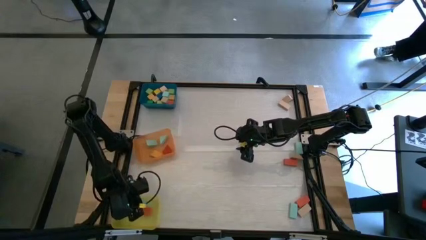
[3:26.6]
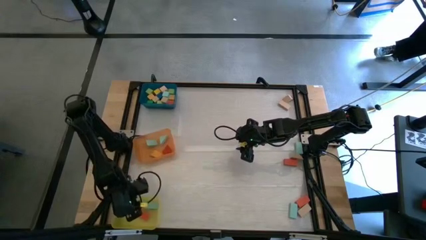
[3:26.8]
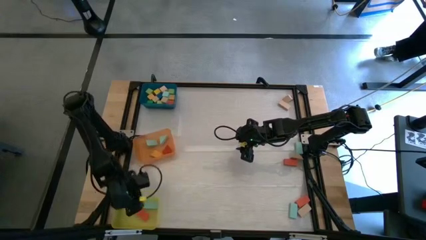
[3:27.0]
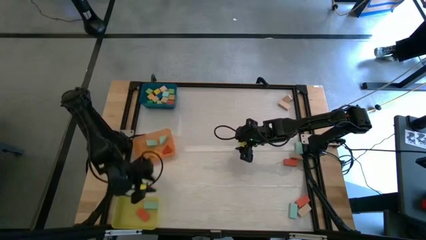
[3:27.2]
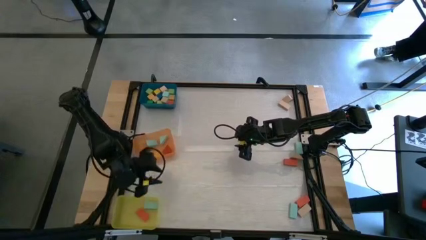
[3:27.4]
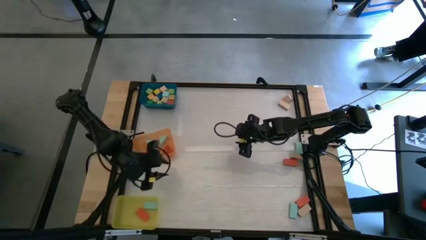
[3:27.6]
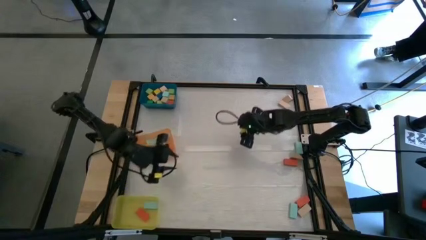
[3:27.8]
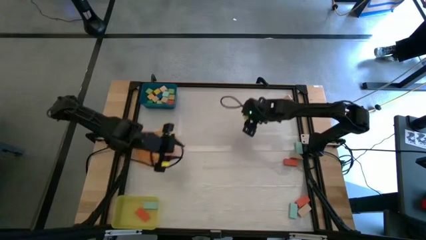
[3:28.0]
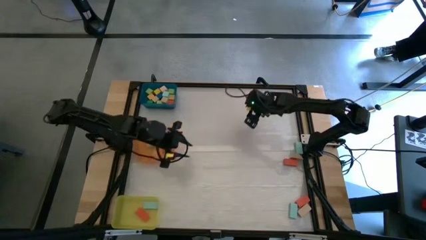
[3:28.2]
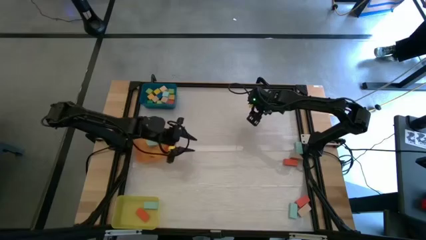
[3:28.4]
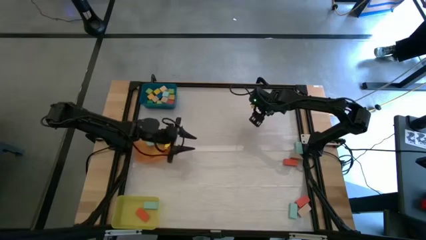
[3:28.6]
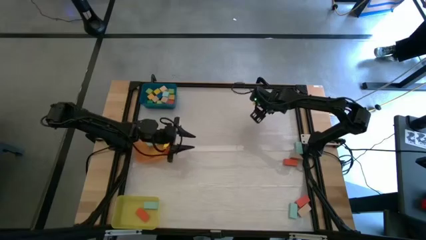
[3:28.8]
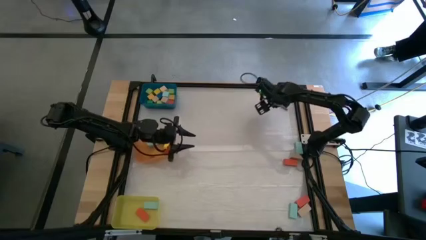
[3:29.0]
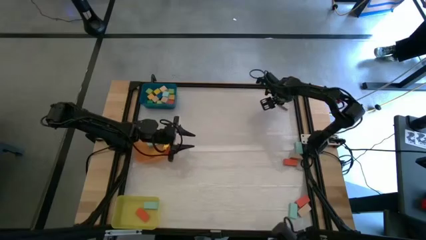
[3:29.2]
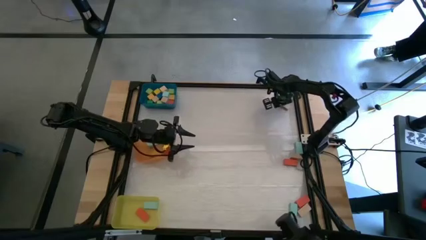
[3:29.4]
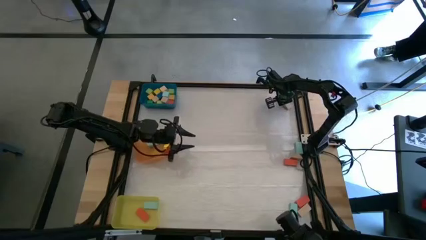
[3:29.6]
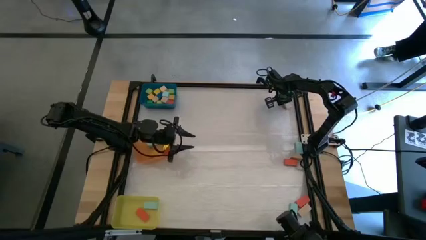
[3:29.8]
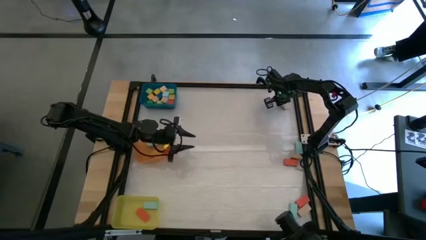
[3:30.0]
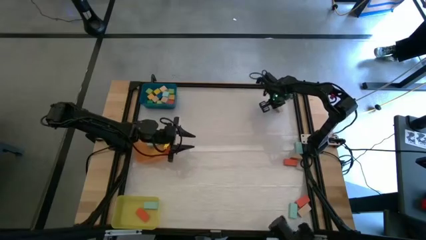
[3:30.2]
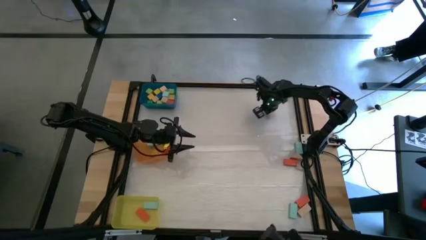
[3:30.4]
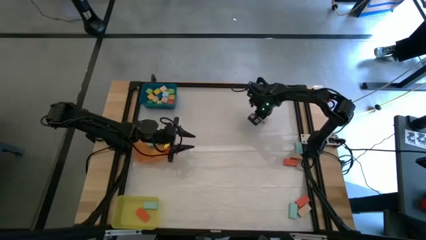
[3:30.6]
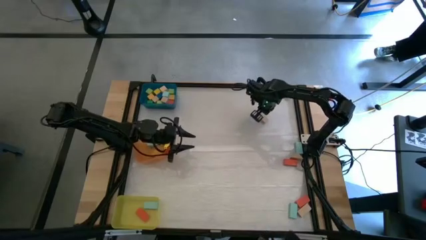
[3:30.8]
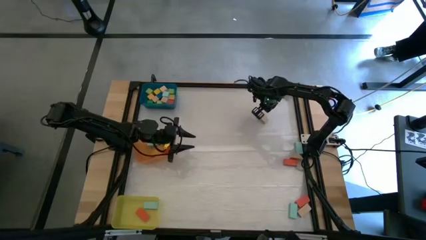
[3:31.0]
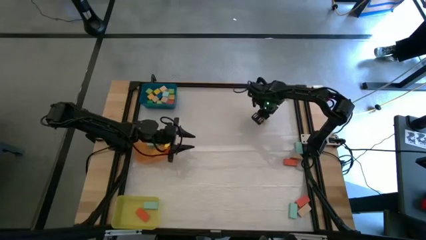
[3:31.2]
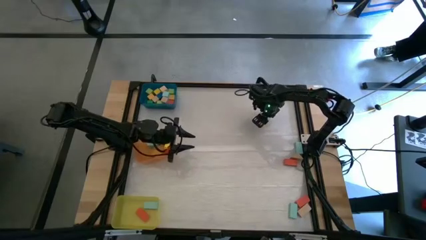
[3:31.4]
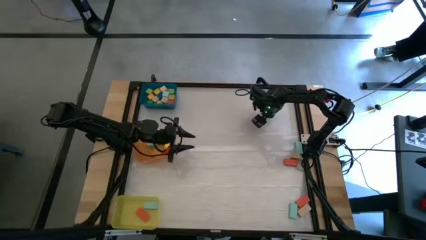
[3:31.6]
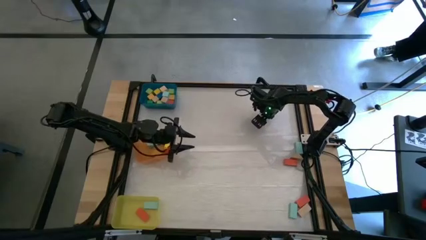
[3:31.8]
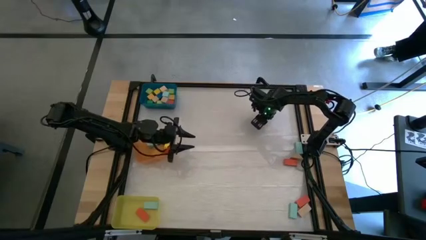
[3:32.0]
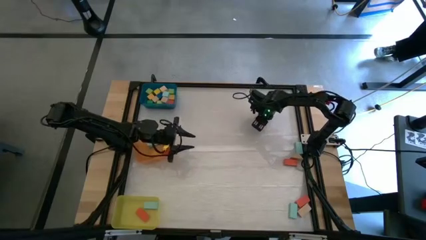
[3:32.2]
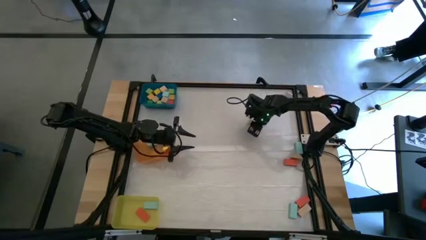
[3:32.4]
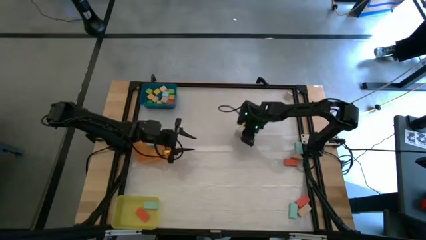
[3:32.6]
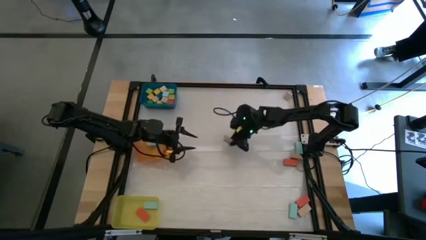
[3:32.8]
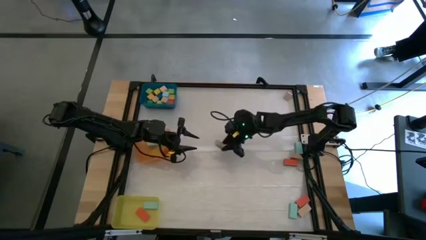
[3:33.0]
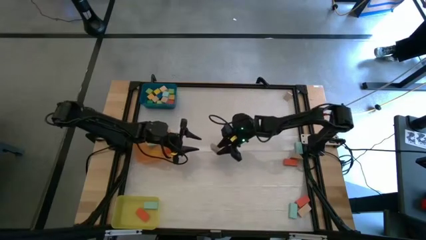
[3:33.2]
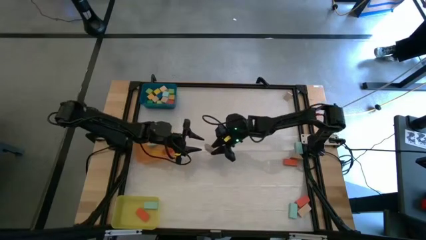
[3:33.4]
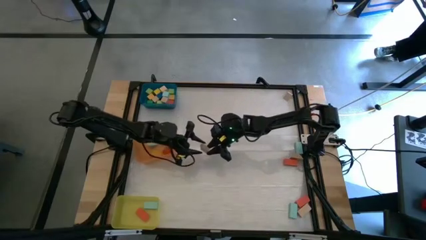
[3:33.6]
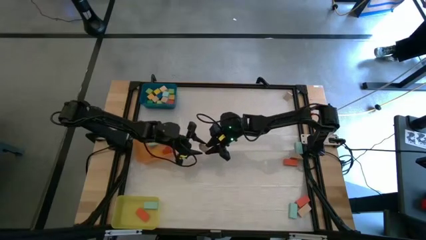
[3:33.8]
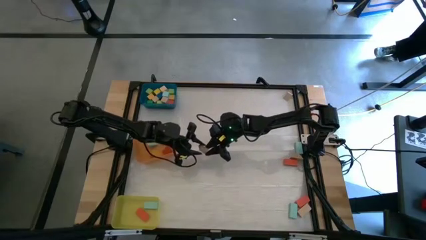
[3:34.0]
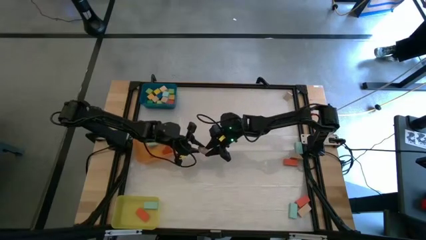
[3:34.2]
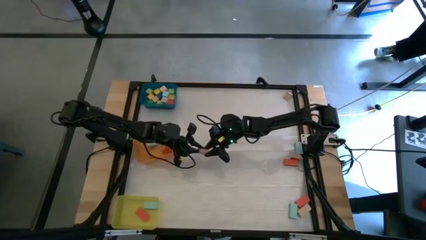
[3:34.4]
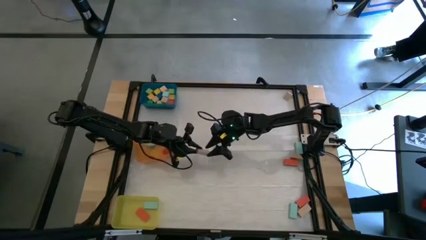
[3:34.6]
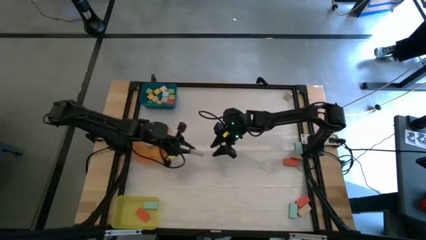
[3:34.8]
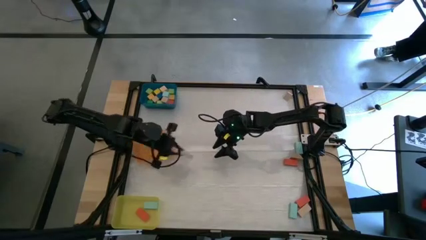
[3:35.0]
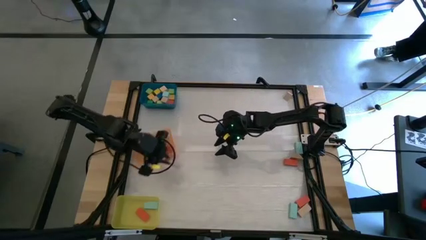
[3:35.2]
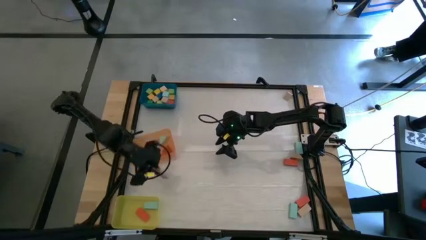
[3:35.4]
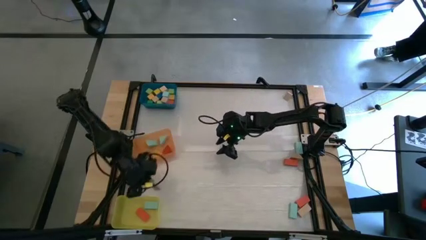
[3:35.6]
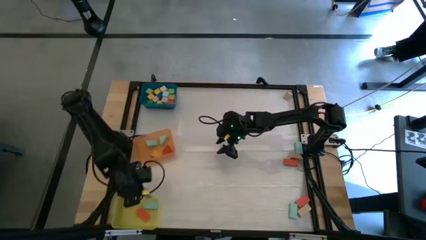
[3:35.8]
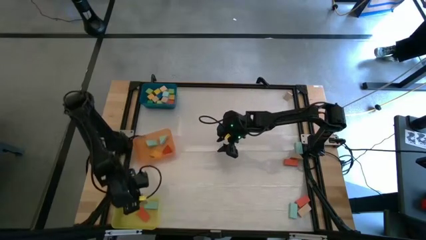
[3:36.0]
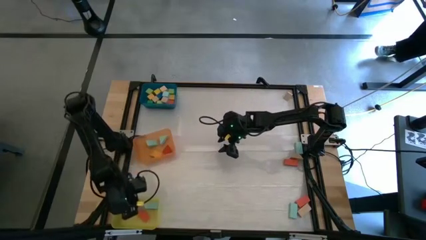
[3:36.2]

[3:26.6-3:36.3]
Task: Sort blocks by size
Put the light brown rectangular block into the yellow bin

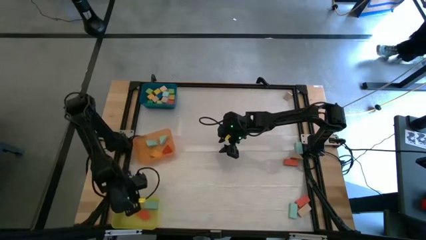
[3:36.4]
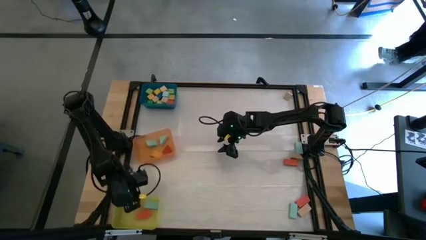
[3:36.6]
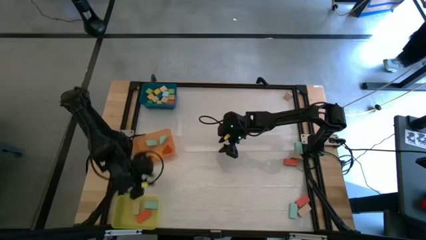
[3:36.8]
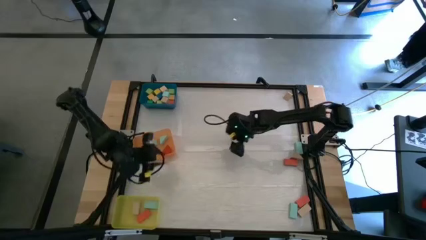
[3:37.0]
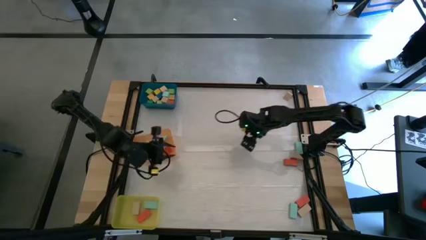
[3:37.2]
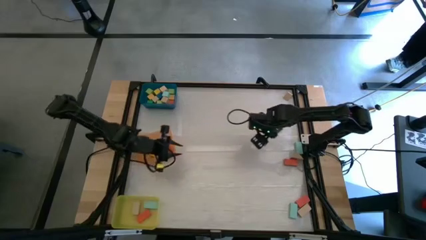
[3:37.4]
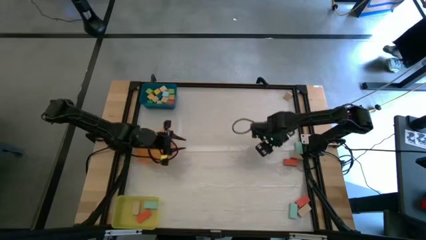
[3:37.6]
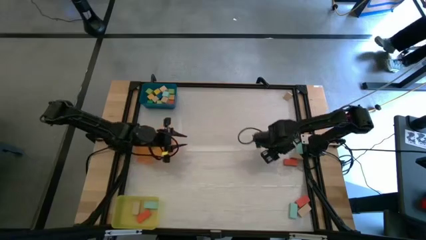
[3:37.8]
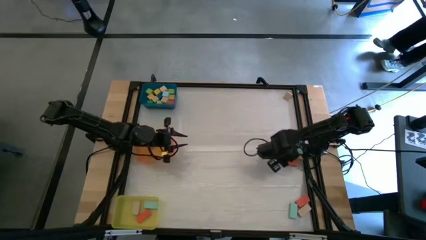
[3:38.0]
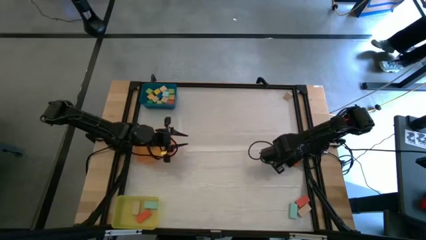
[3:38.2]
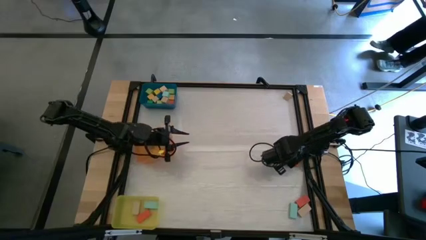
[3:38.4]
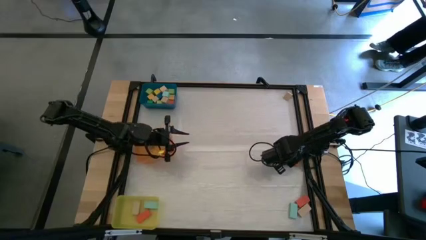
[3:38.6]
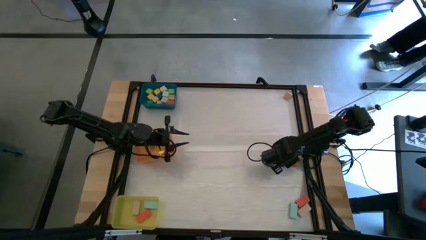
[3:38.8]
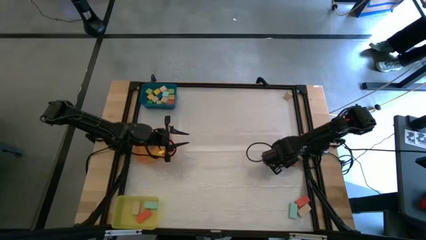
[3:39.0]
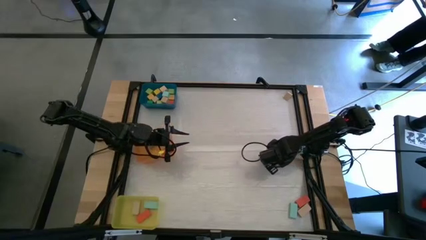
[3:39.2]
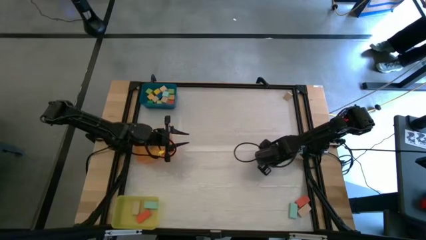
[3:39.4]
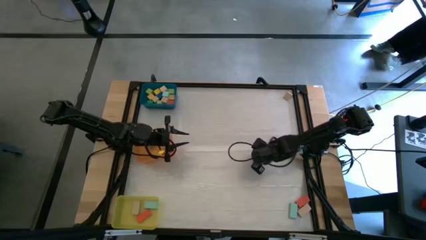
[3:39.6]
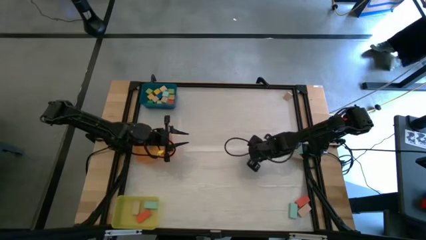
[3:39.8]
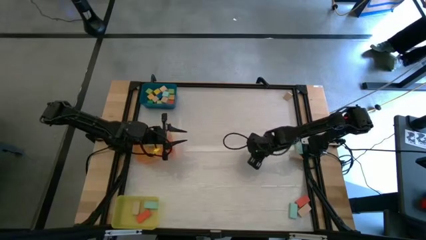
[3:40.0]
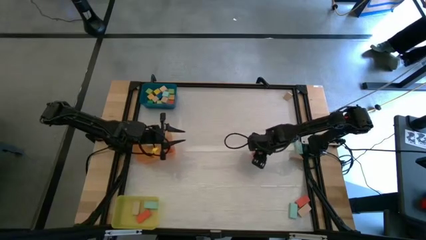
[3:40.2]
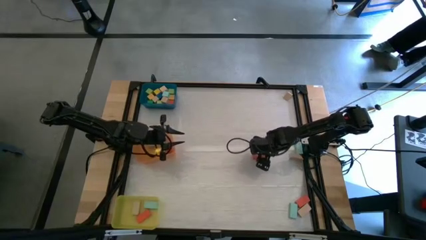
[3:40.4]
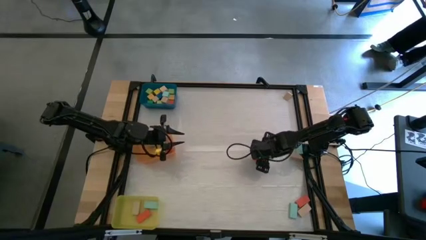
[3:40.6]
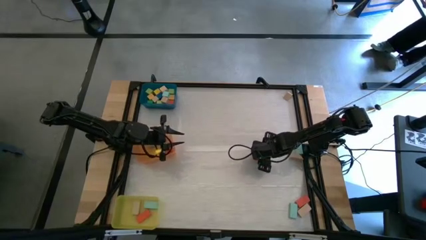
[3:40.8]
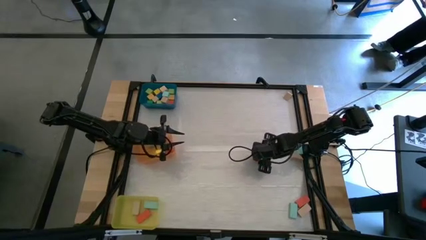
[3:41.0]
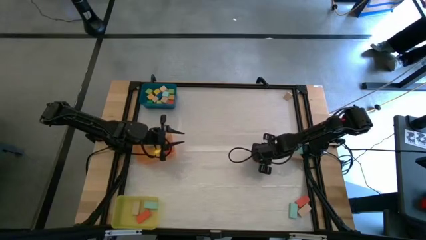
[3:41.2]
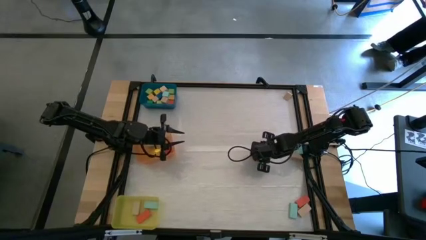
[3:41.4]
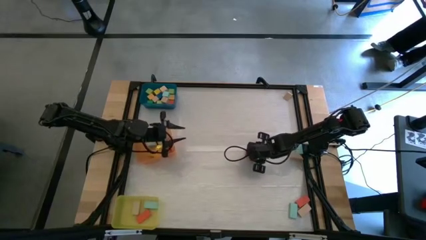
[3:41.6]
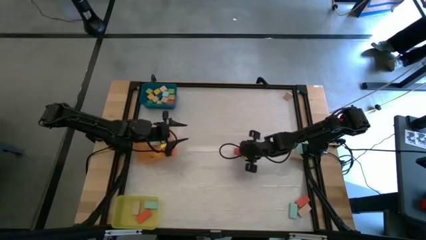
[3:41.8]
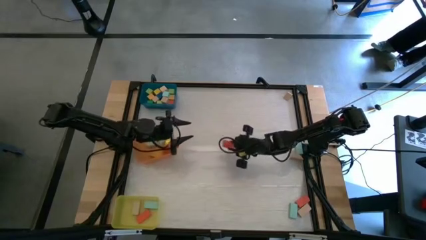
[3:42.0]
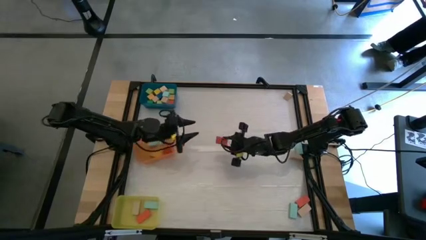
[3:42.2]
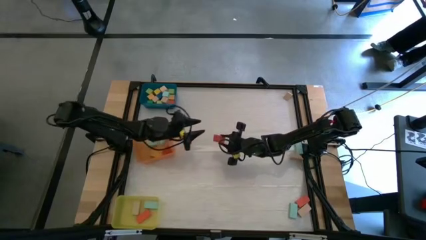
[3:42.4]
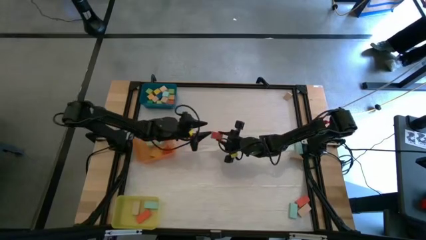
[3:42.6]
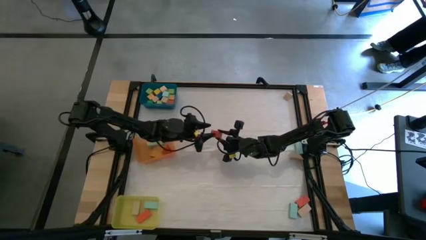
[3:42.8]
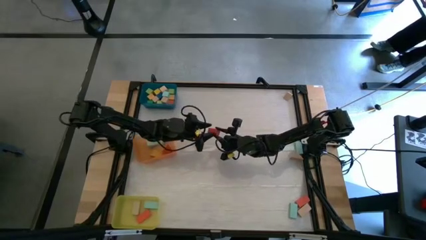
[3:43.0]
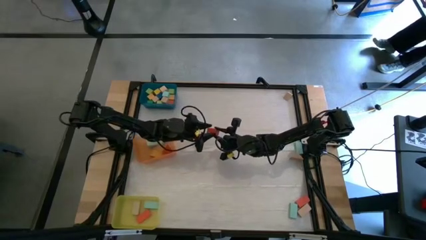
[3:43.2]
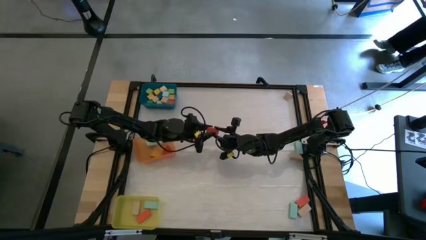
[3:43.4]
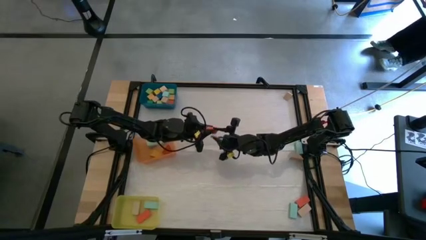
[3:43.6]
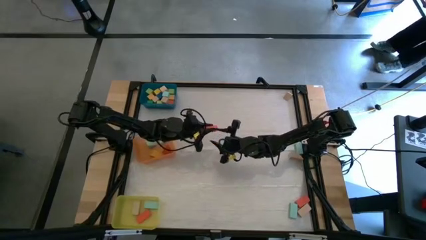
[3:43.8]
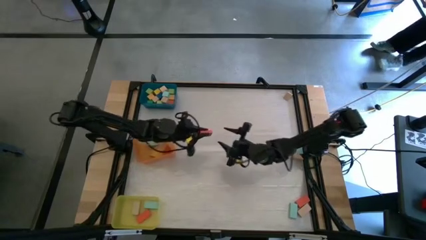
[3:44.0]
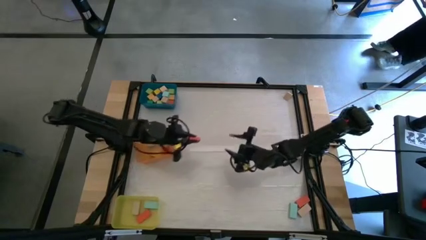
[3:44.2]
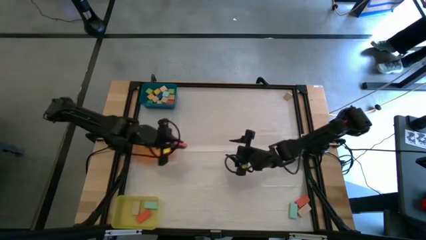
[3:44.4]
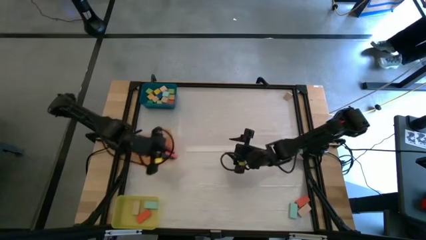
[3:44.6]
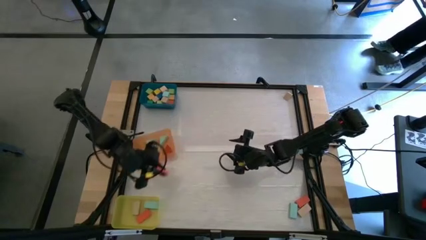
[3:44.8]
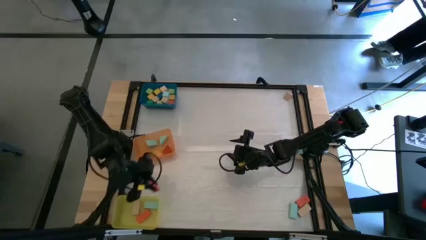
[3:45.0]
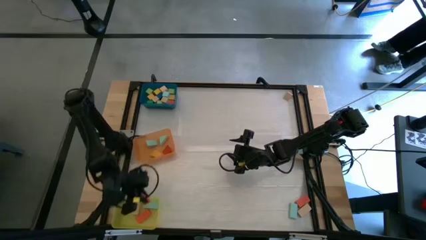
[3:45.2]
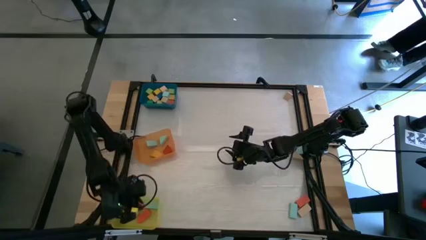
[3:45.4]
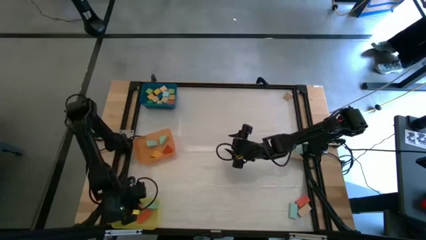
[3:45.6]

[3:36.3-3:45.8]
Put the red rectangular block into the yellow bin
